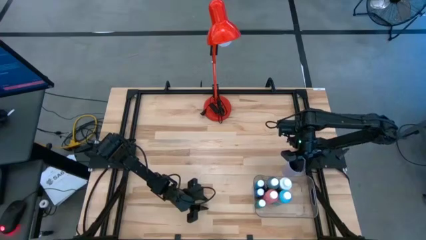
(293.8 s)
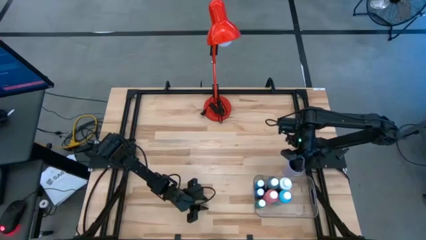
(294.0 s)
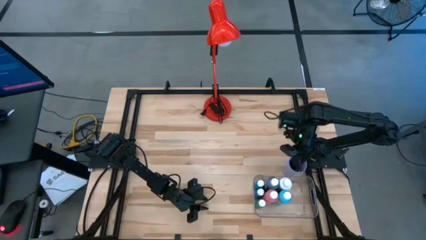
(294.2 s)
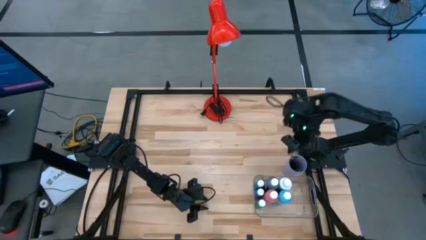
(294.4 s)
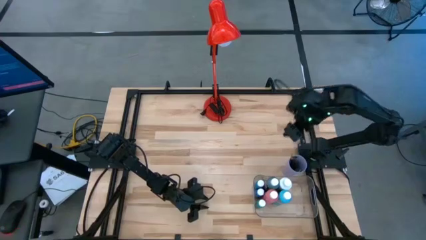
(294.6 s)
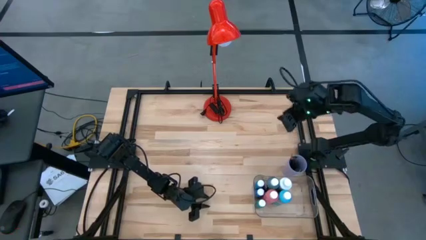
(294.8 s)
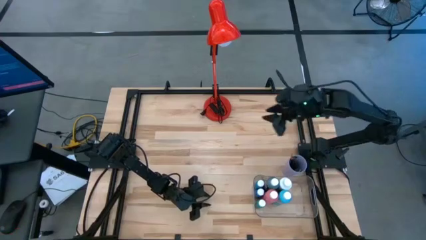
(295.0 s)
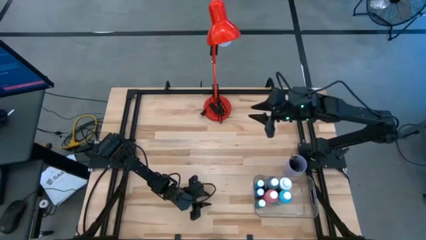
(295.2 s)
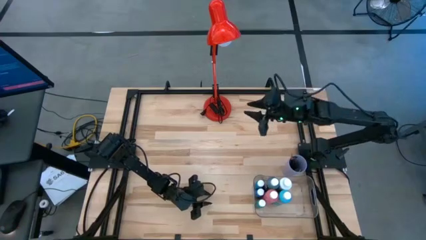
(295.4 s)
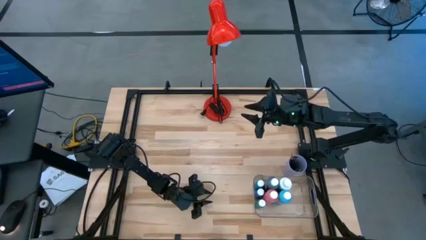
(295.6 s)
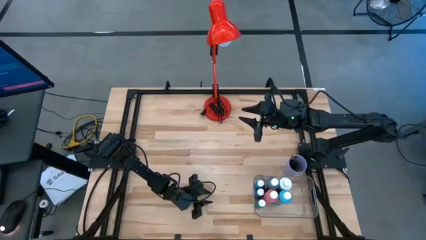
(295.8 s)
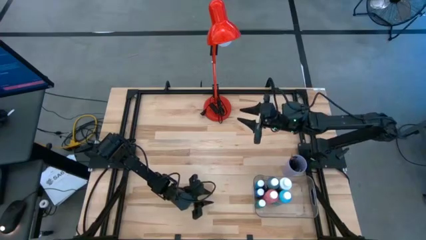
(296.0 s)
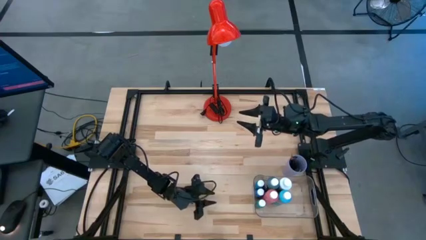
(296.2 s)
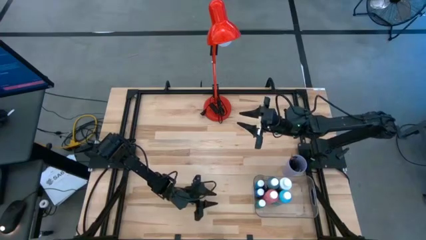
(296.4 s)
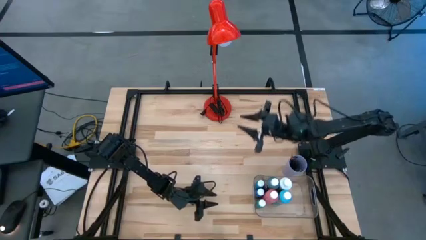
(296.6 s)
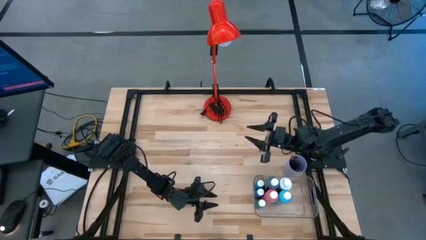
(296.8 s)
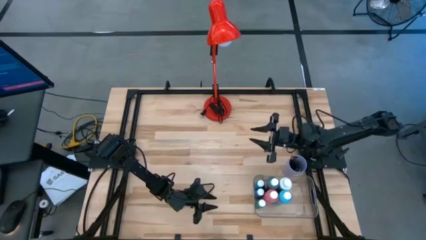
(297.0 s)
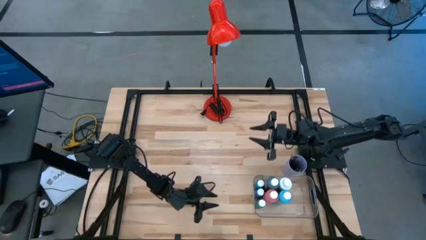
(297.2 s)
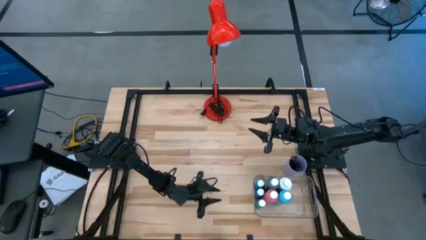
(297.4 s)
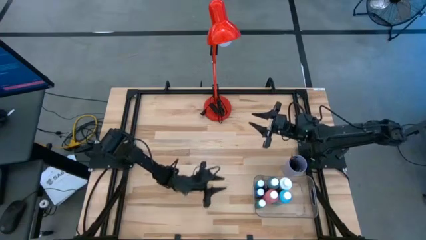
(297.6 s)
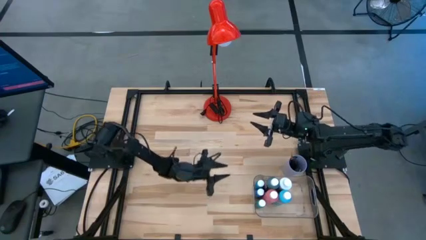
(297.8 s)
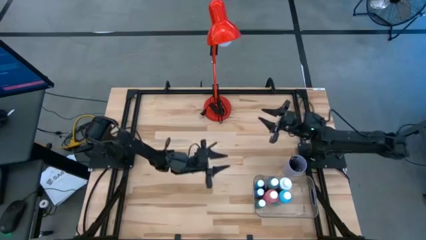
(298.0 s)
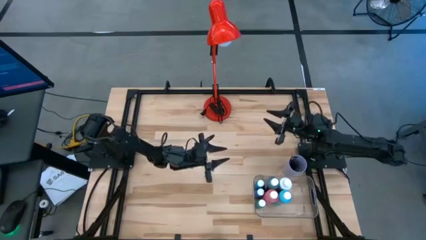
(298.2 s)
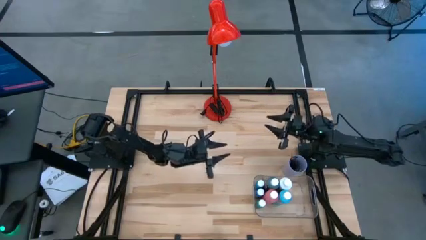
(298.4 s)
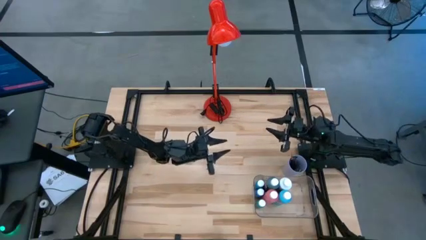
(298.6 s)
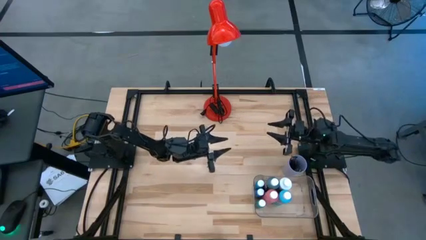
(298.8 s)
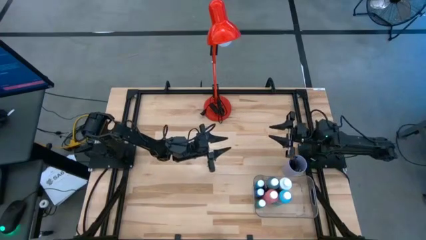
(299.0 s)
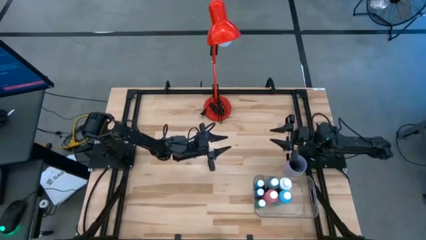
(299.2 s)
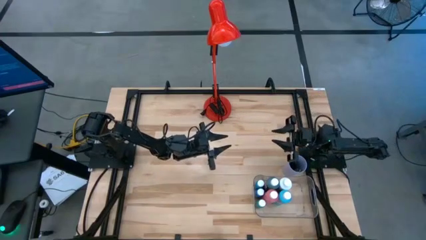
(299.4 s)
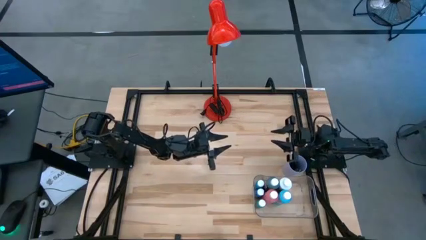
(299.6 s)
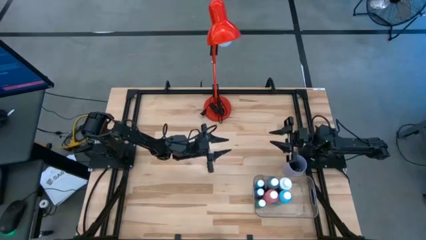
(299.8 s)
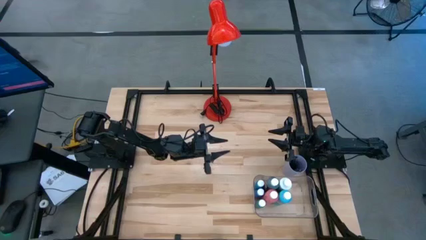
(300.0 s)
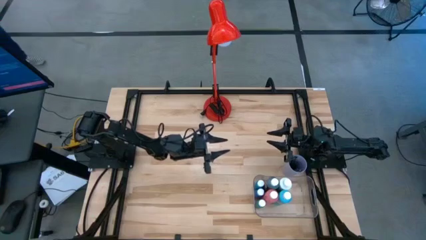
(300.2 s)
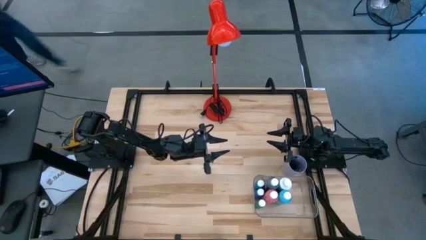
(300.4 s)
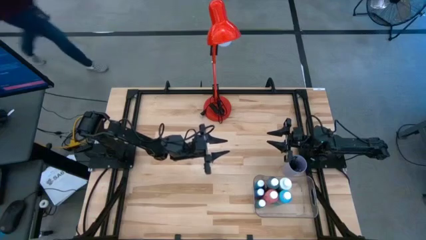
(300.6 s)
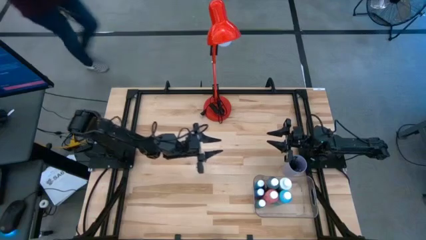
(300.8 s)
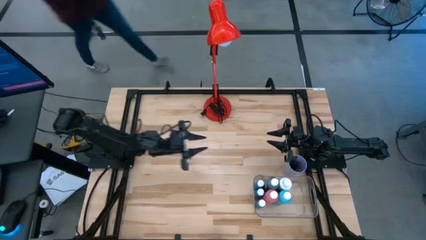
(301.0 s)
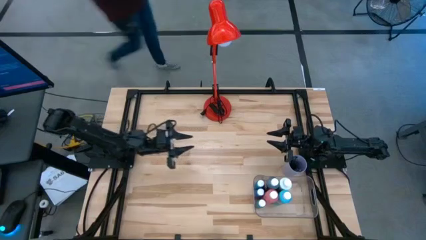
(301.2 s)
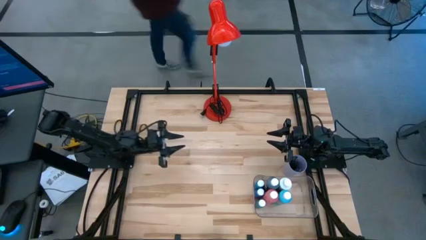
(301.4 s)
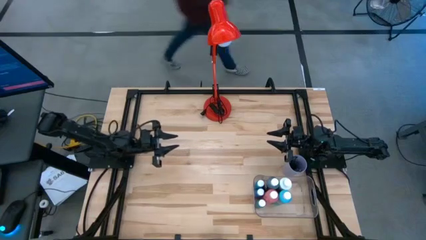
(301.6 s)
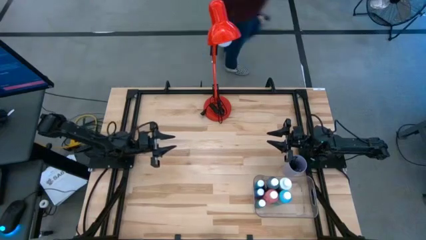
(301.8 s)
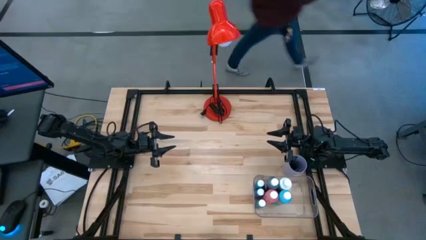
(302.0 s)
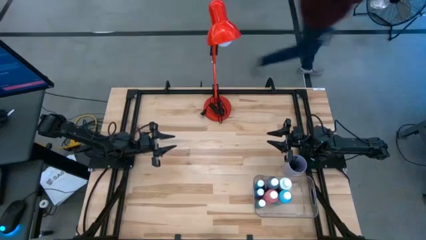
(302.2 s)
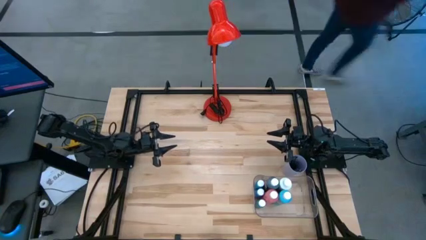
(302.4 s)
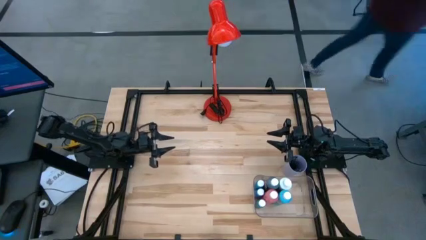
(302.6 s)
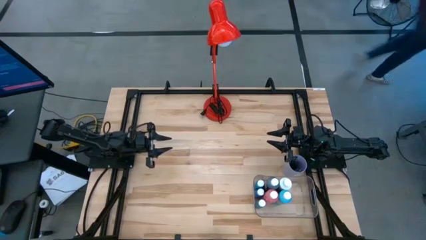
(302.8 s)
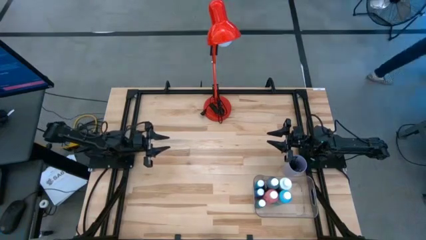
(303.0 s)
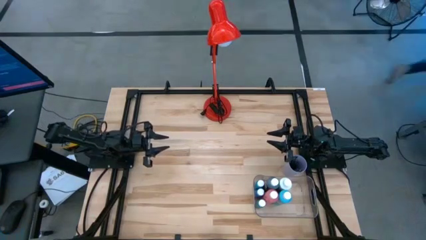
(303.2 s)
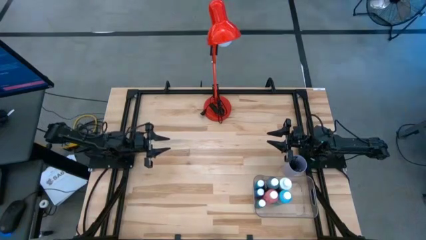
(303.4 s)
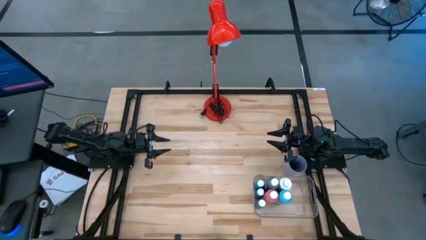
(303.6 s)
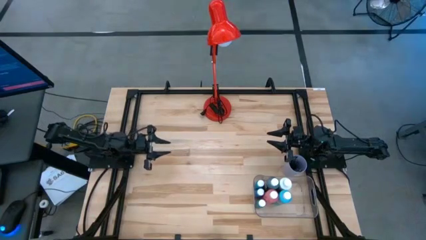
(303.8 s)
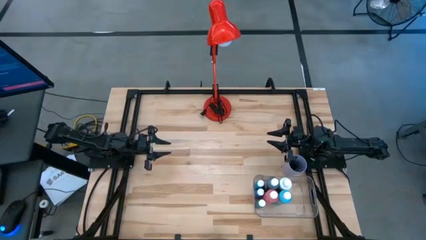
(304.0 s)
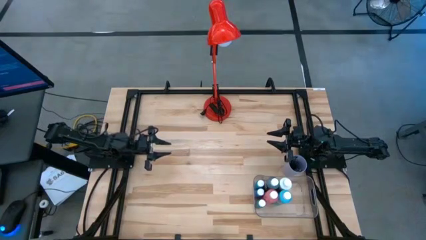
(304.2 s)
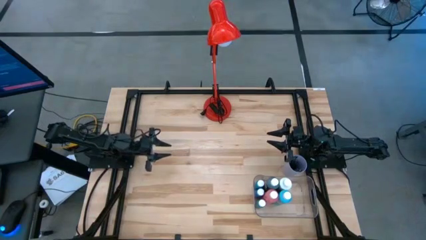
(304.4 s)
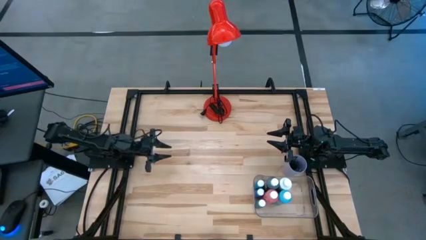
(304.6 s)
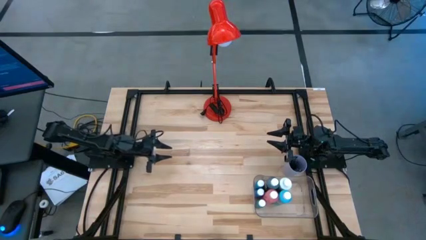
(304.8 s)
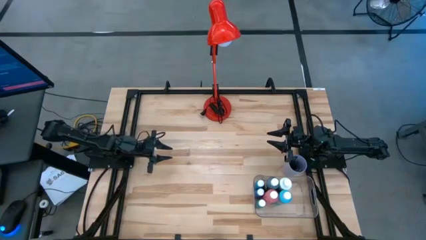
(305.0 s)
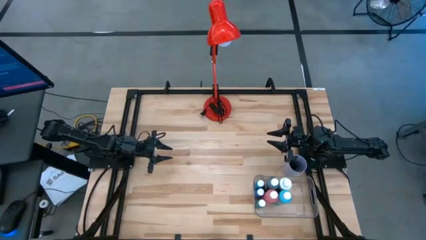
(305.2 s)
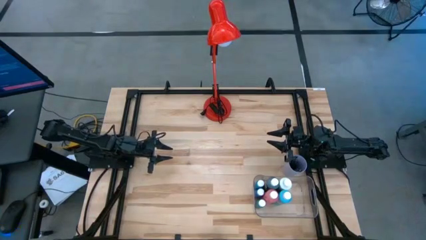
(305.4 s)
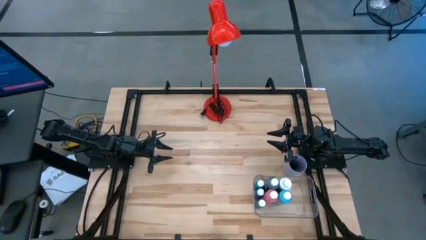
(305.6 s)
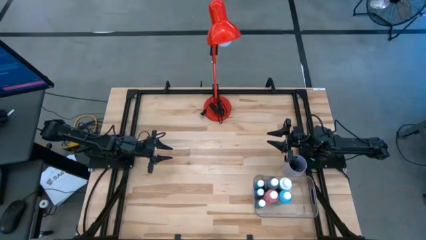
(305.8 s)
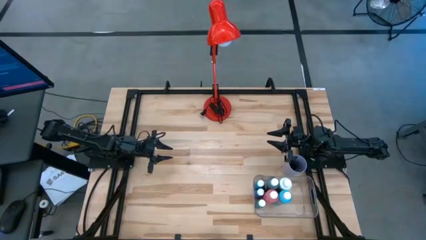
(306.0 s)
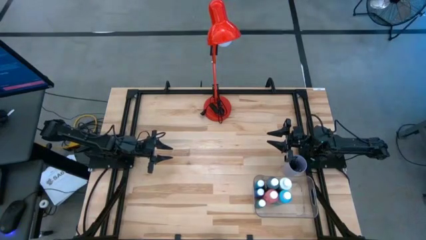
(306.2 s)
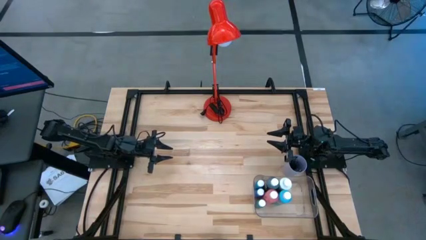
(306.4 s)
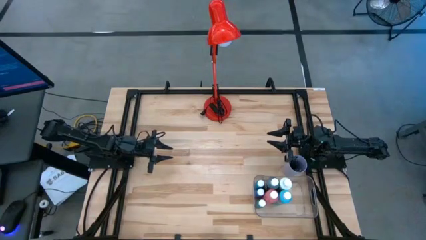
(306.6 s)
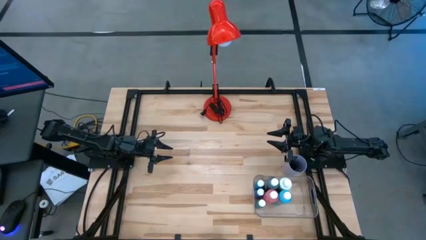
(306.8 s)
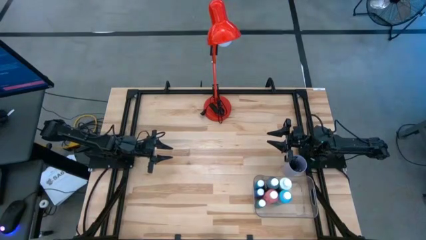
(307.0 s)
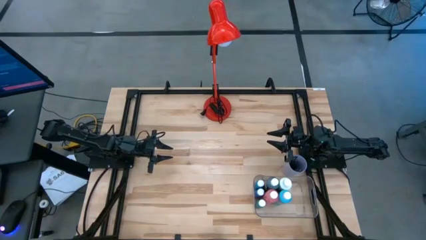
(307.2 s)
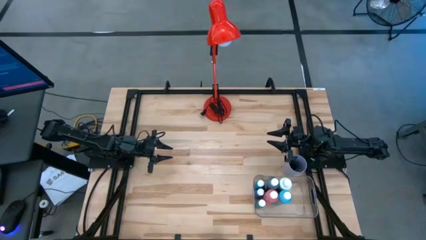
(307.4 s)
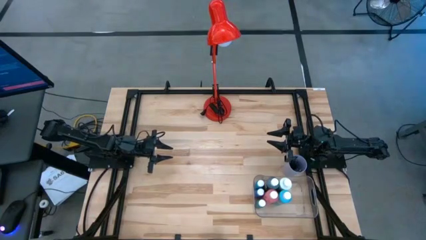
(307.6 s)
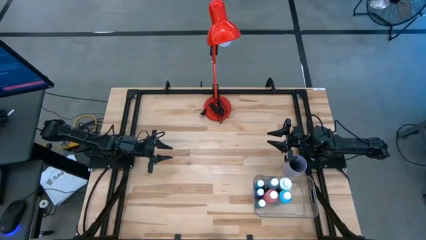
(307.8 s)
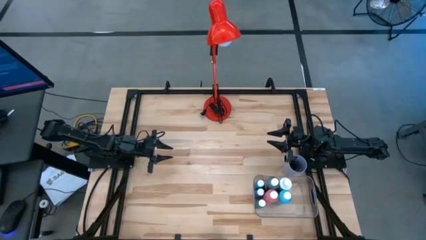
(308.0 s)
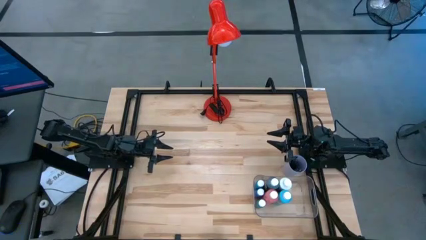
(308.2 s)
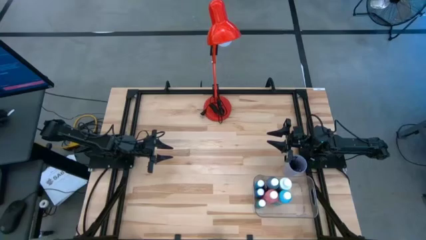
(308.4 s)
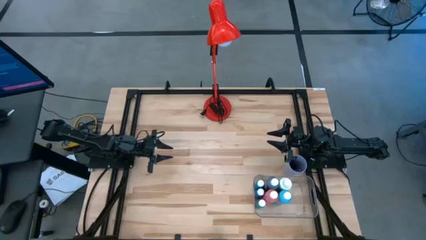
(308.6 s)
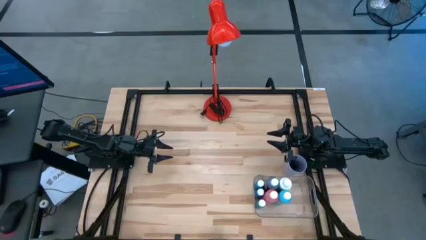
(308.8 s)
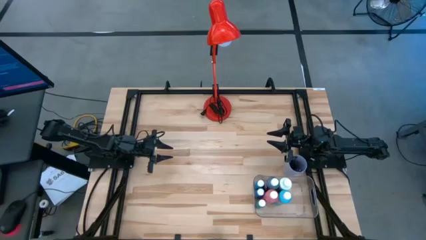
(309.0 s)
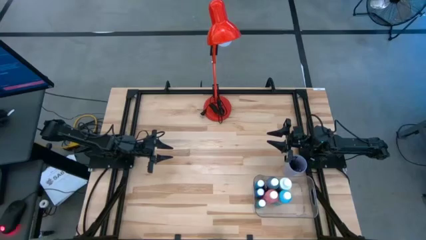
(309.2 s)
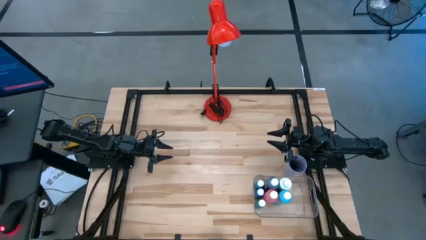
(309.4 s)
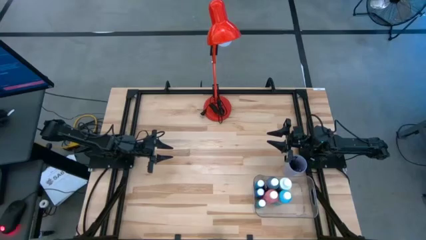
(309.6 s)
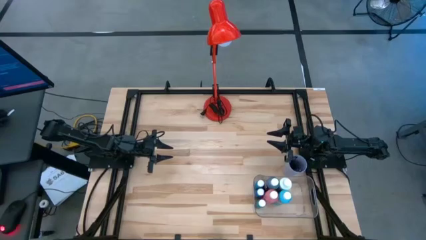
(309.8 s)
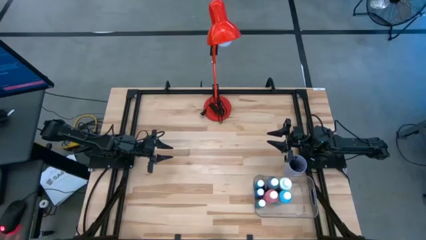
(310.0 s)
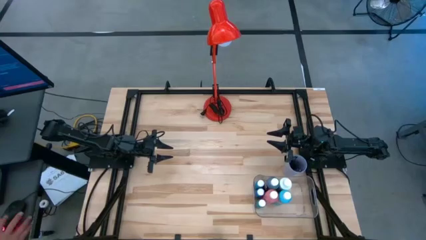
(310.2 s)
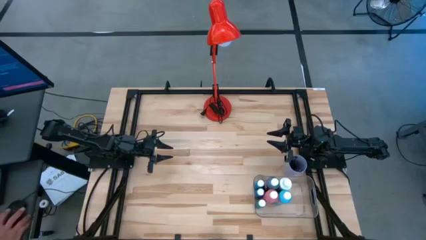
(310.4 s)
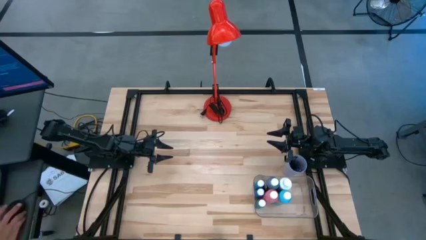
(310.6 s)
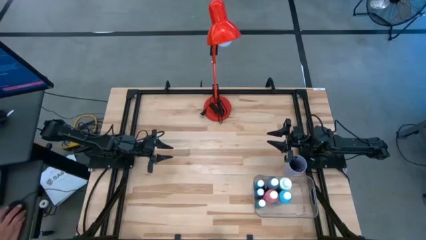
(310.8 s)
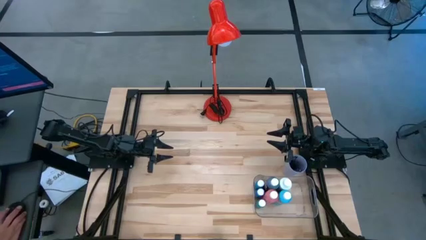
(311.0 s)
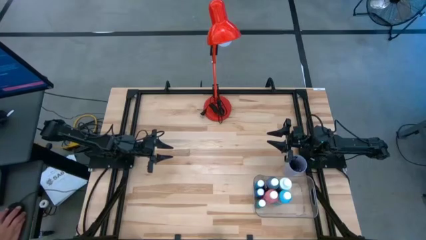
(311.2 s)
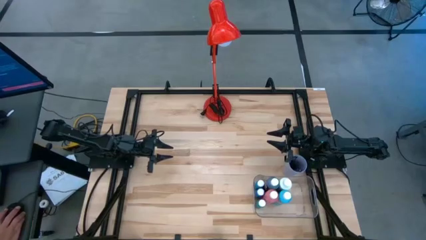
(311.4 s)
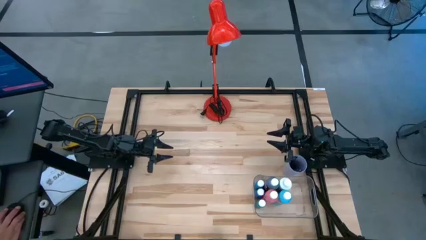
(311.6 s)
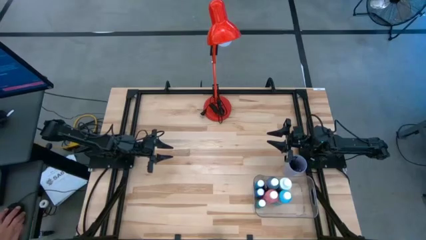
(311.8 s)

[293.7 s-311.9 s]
Task: Pick & Place Paint Supplies
Return to Home Position
